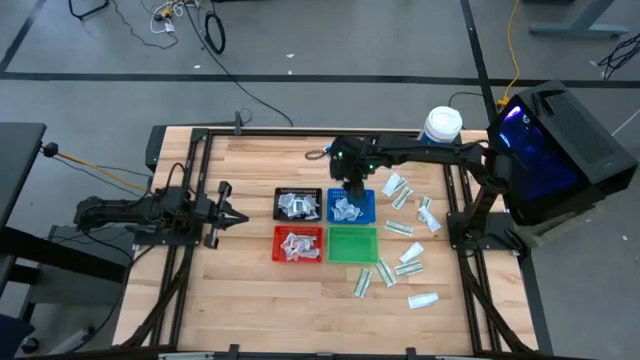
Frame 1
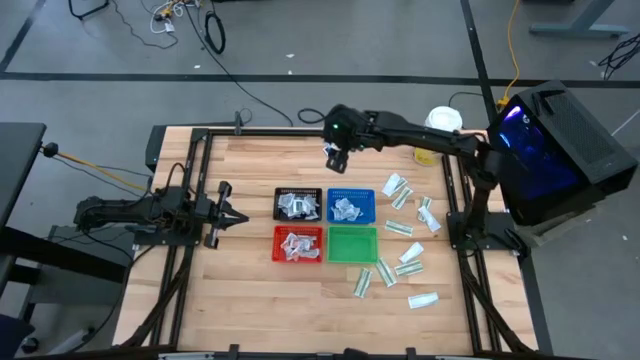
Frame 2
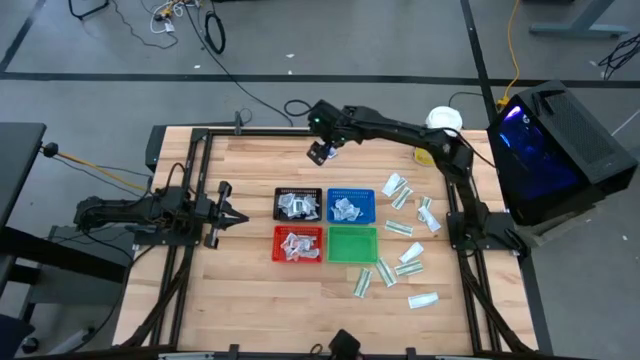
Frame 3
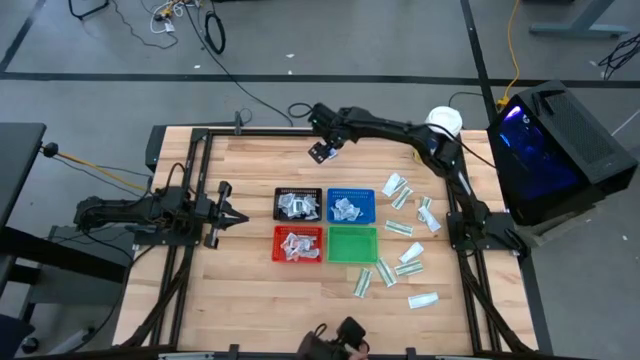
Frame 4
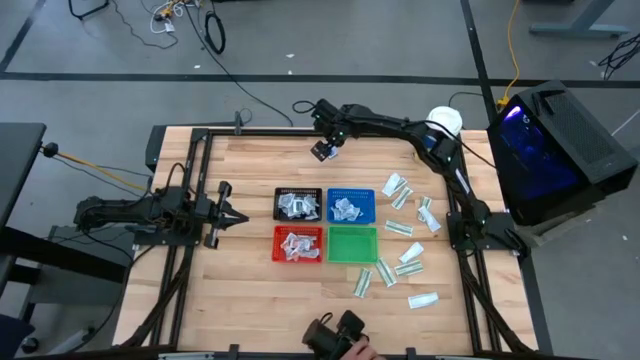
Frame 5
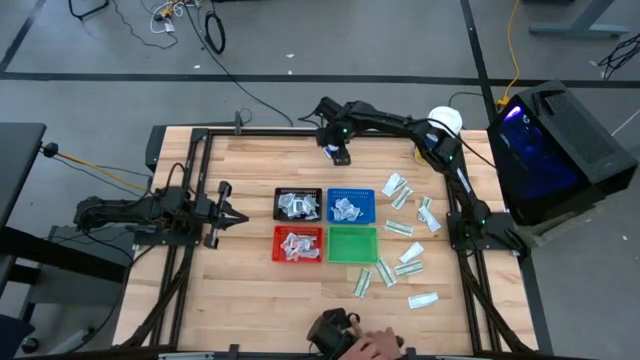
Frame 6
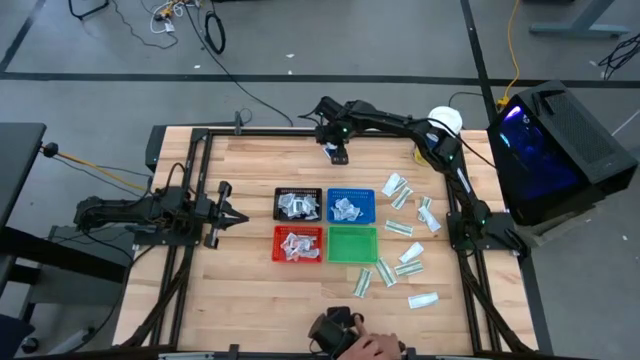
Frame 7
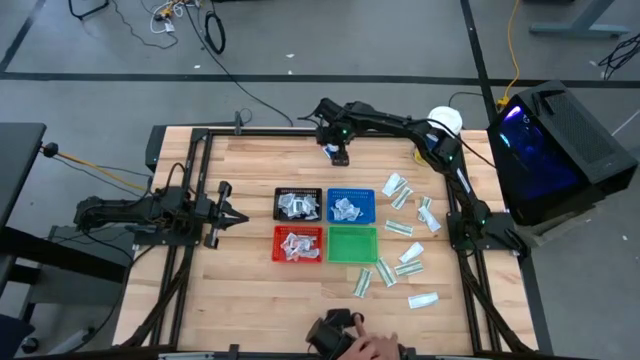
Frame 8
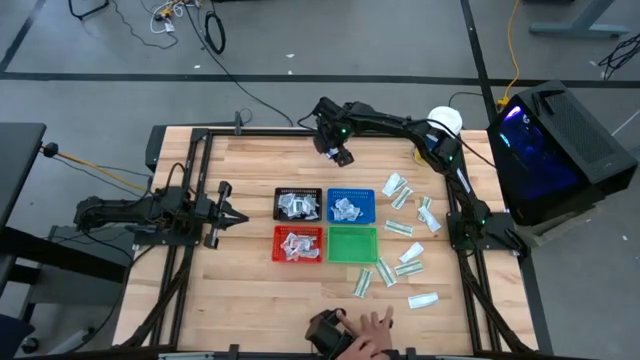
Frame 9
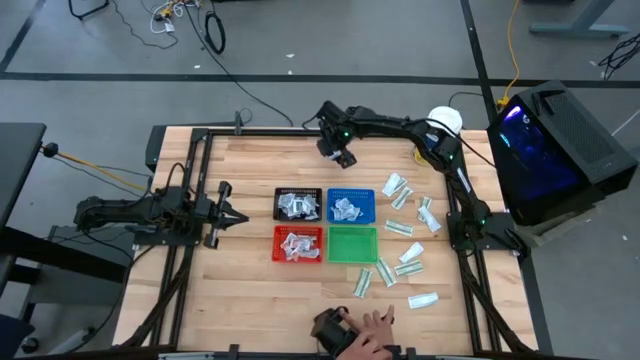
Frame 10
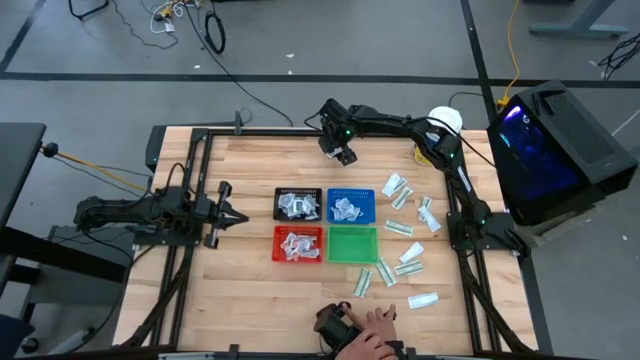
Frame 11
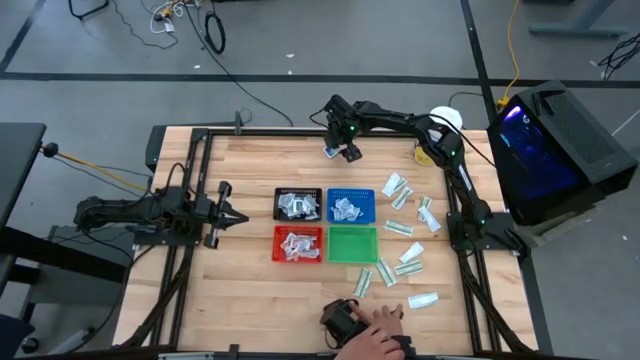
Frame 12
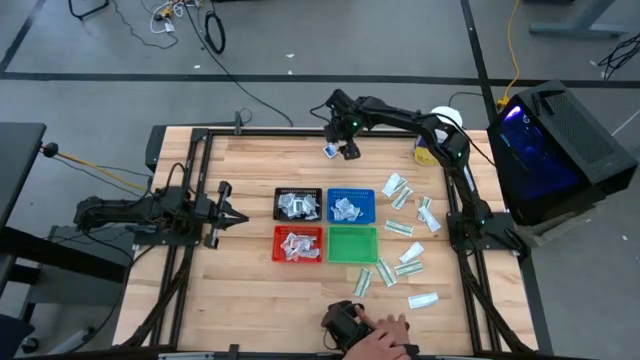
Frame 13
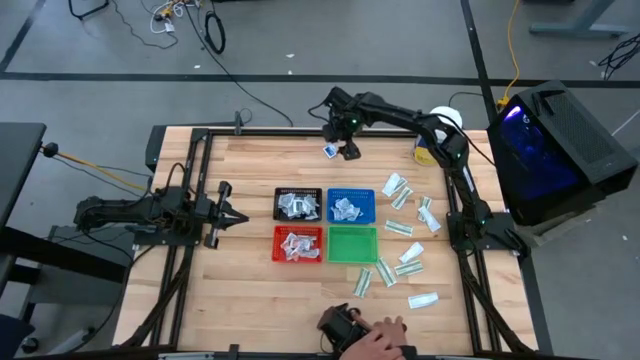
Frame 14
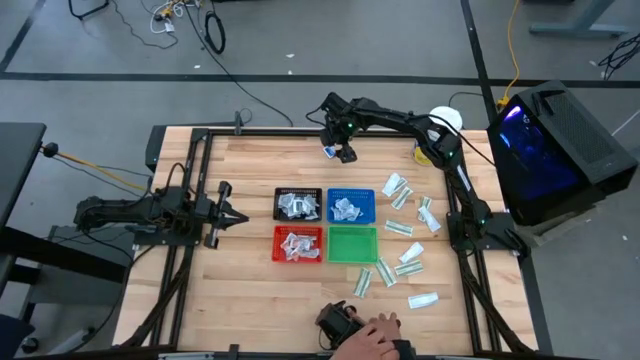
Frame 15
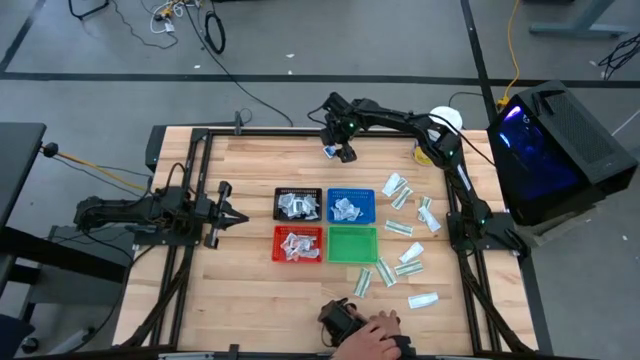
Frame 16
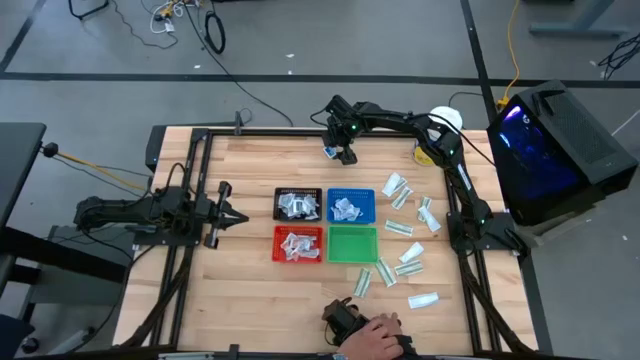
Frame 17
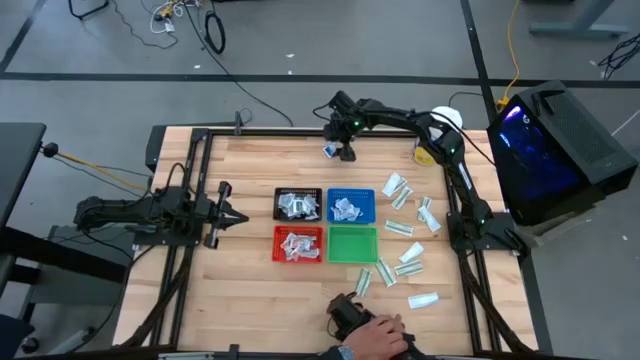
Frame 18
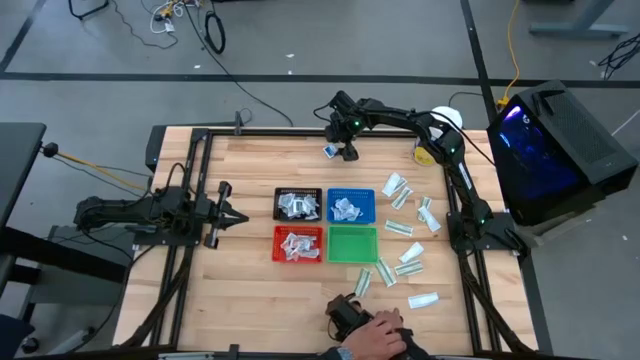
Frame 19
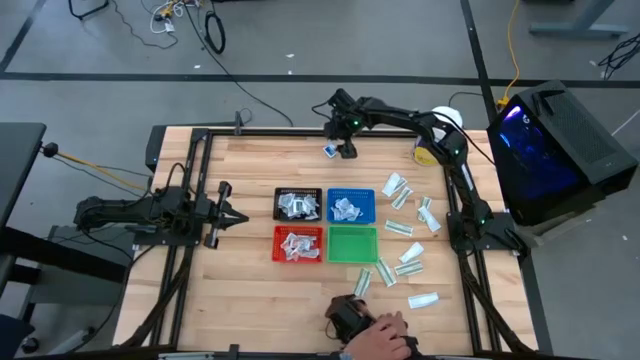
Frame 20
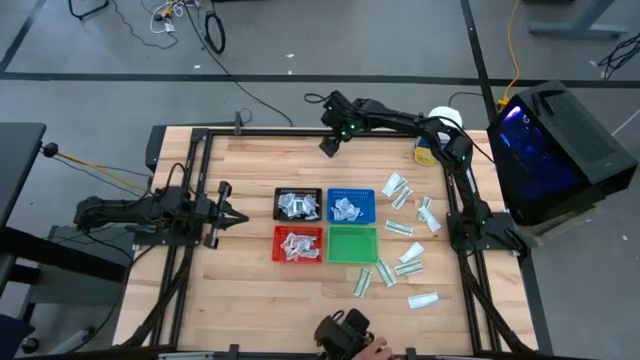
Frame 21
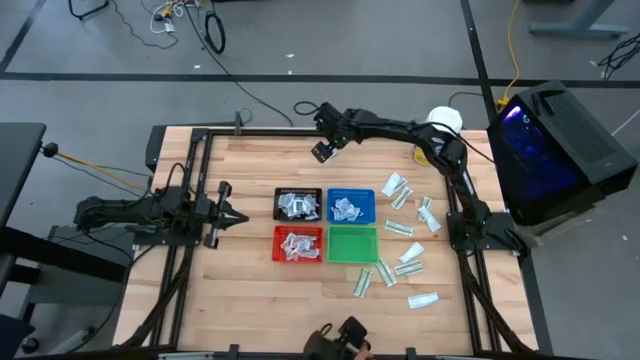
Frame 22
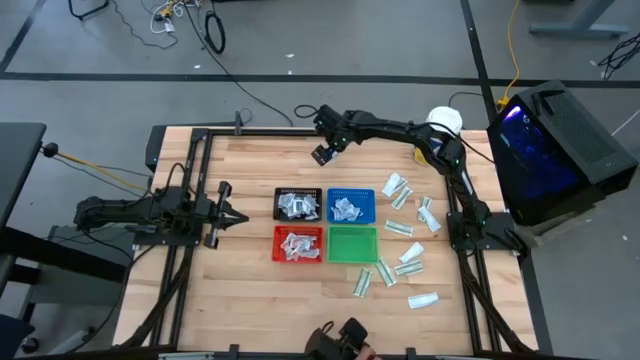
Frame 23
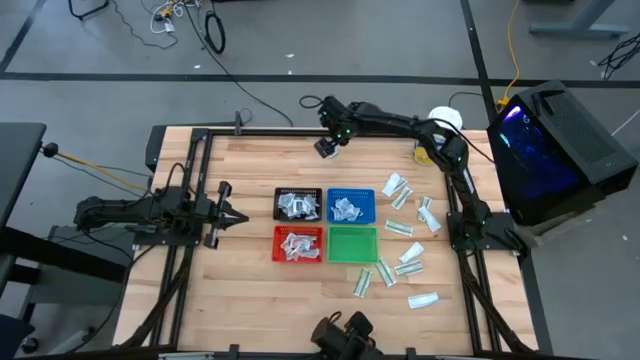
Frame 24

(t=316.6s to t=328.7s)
Task: Pick & Place First Aid Supplies
Put the top blue alcohol pad into the blue bin

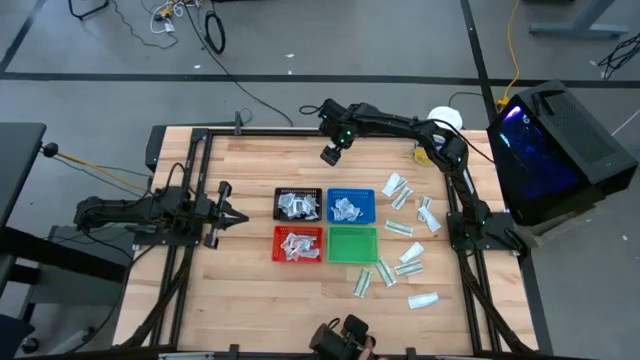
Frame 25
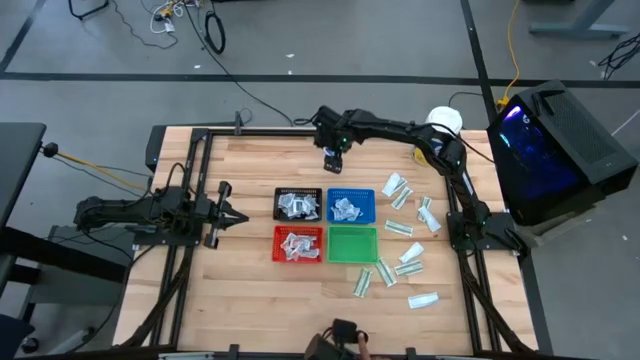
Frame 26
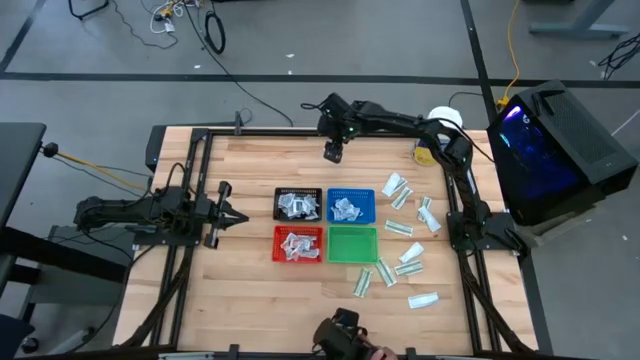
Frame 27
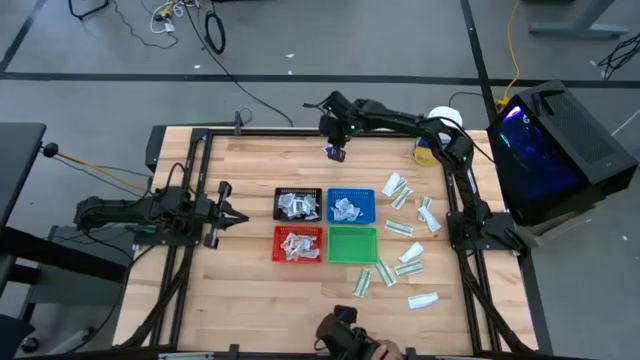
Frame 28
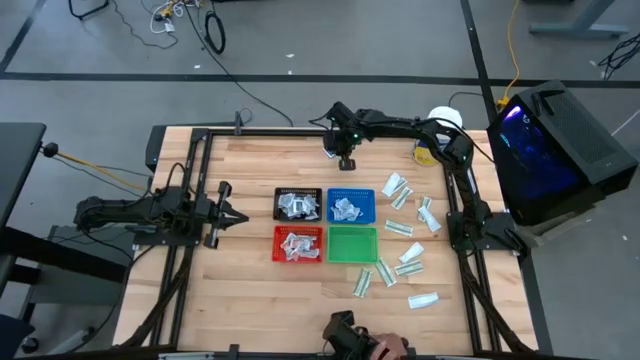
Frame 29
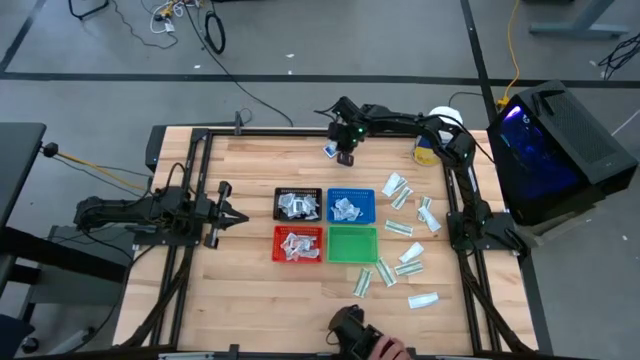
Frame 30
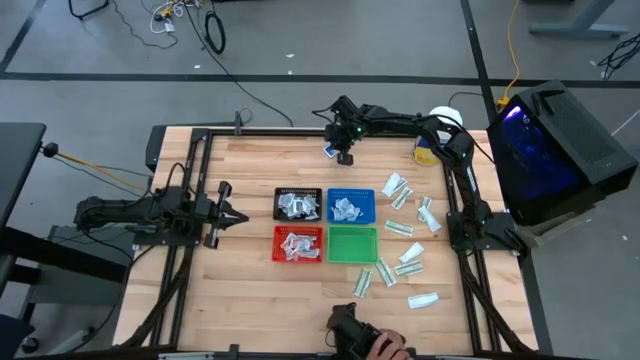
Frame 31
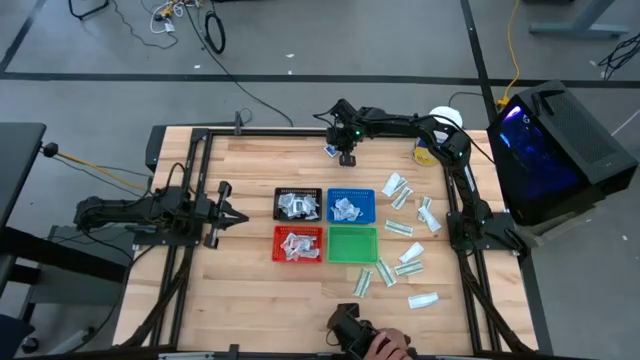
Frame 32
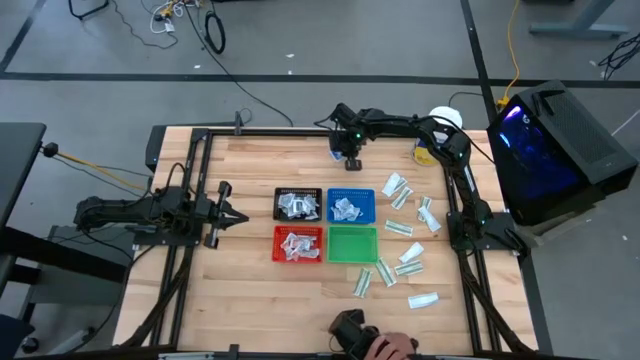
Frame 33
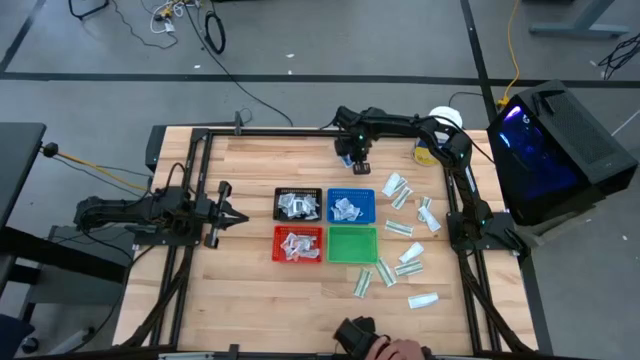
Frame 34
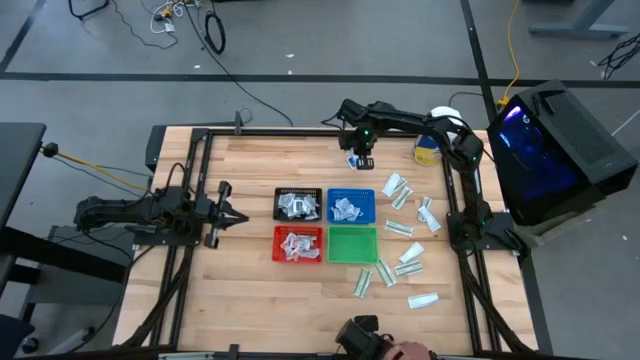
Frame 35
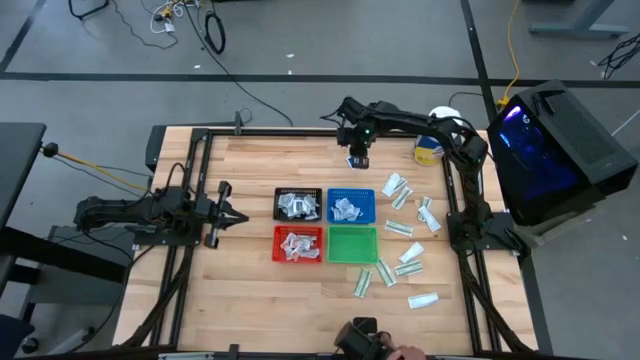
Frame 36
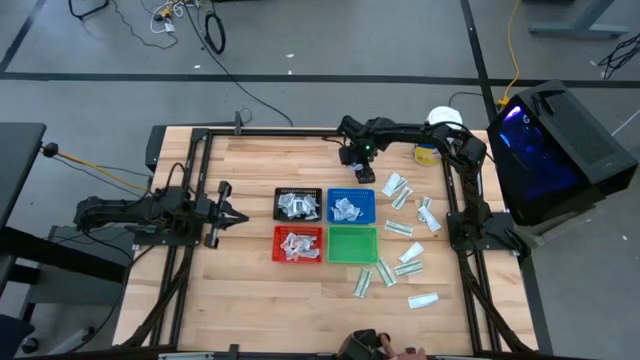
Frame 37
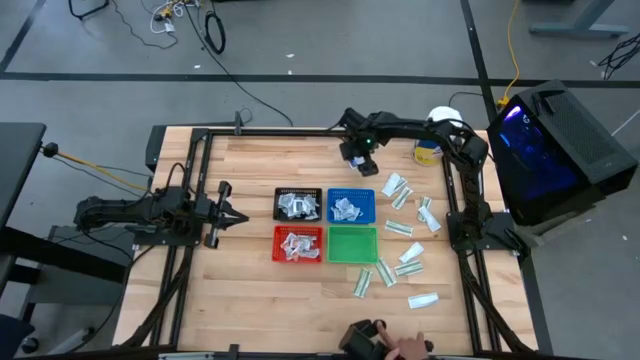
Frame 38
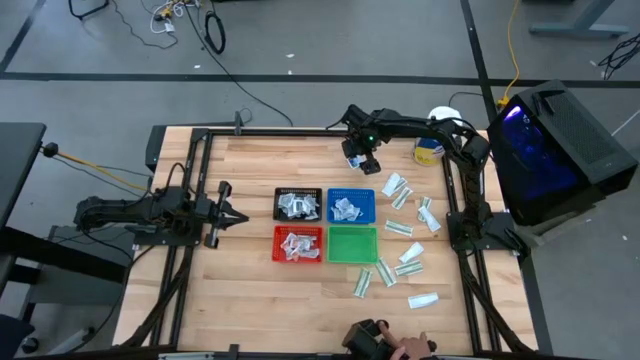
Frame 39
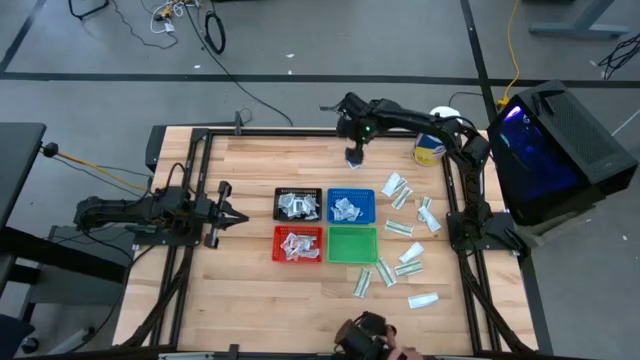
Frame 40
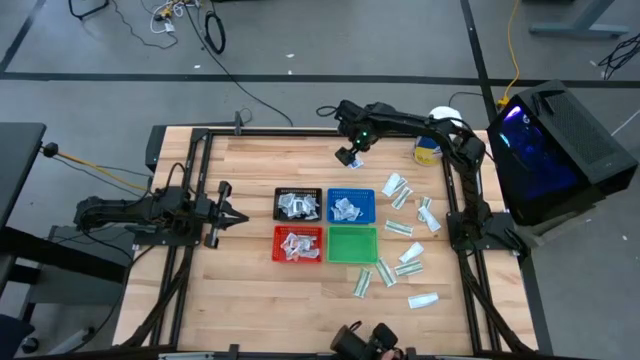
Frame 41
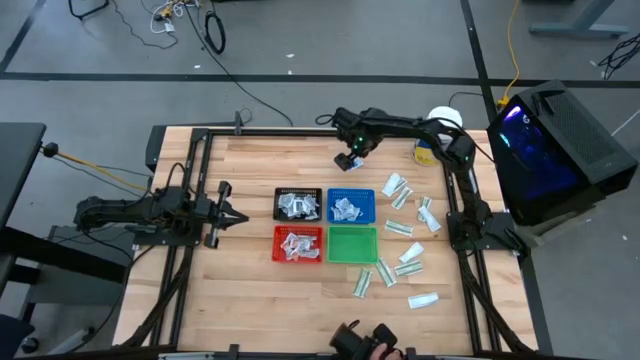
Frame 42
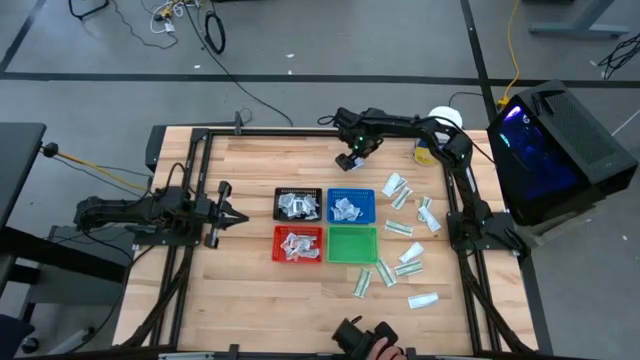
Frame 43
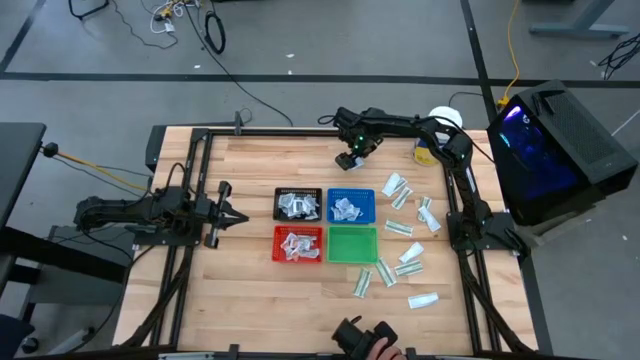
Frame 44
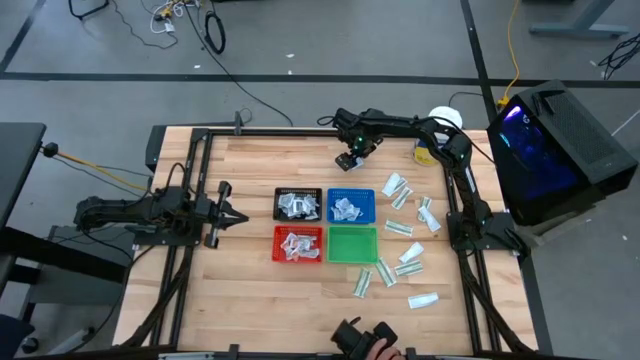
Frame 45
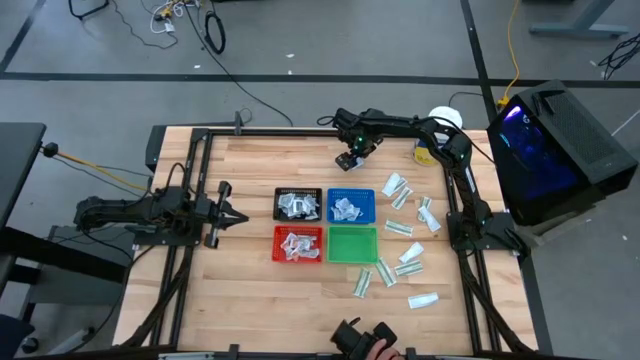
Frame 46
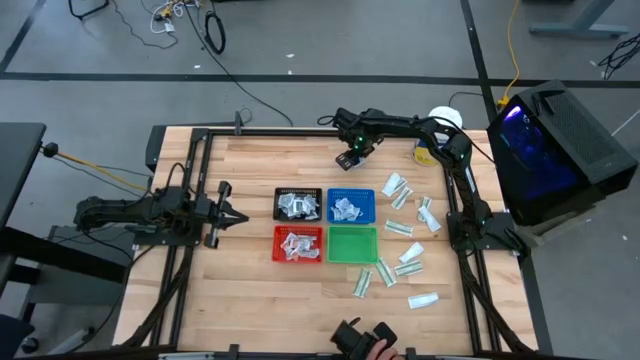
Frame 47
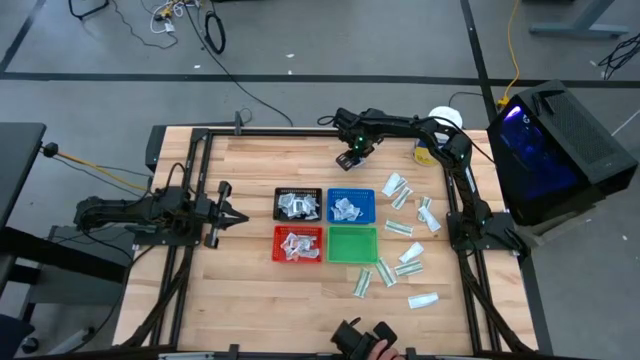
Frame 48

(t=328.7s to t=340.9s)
Put the top blue alcohol pad into the blue bin
